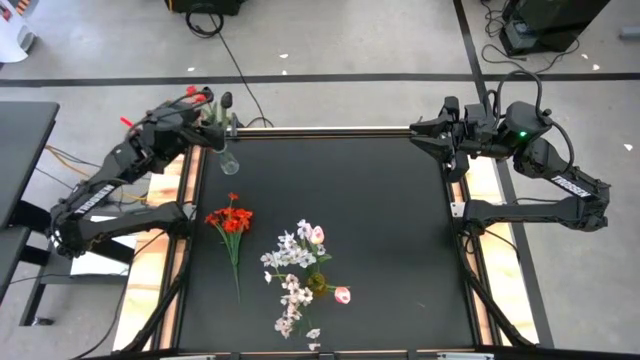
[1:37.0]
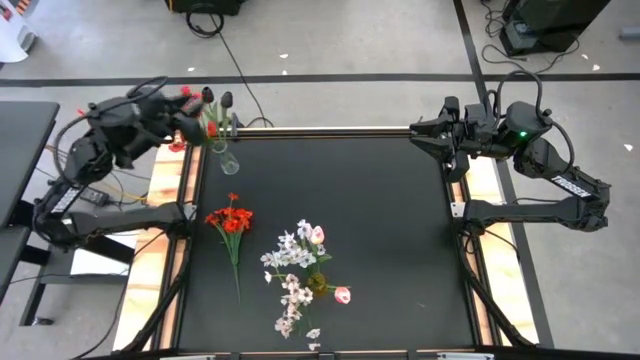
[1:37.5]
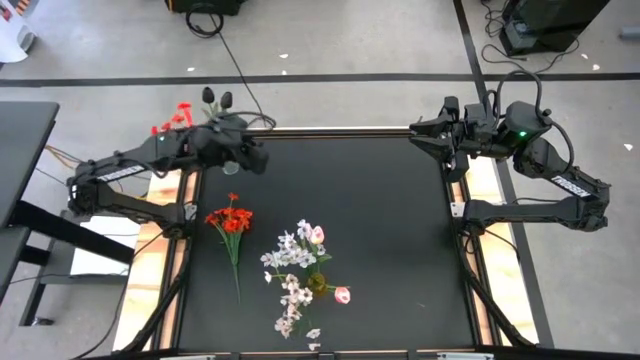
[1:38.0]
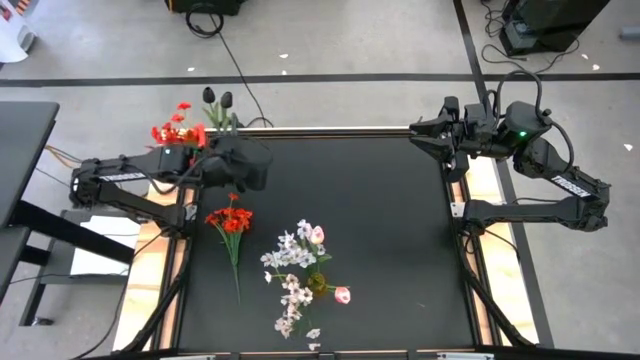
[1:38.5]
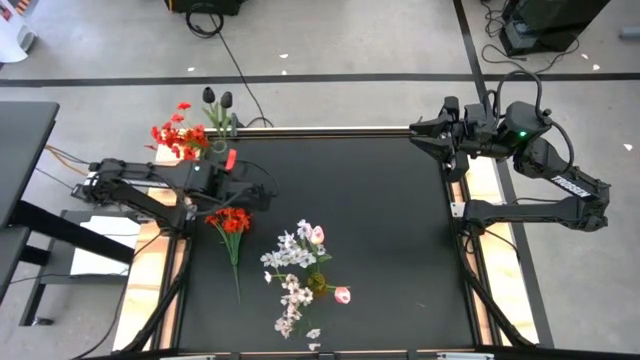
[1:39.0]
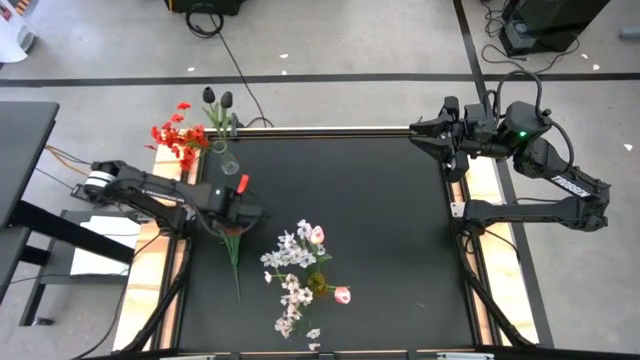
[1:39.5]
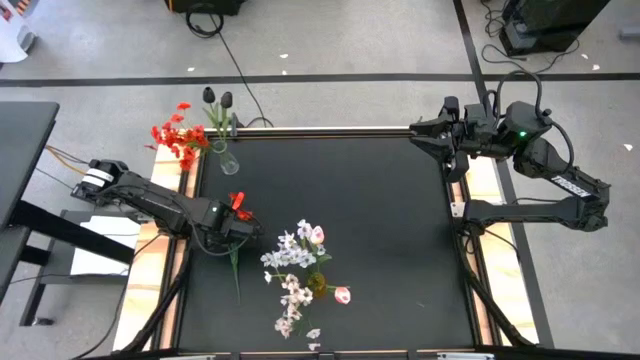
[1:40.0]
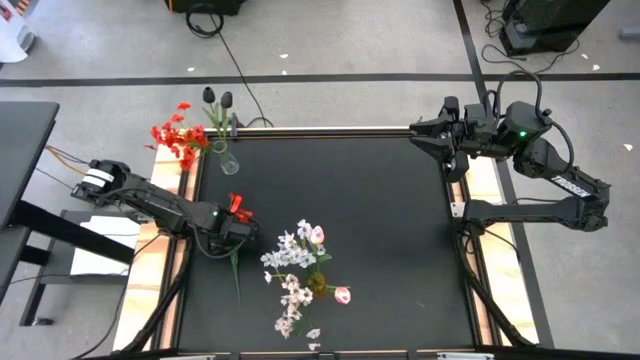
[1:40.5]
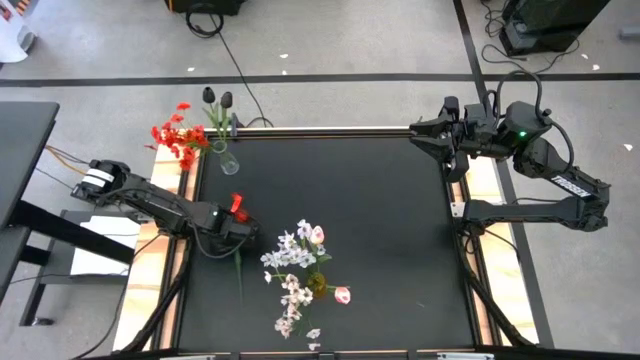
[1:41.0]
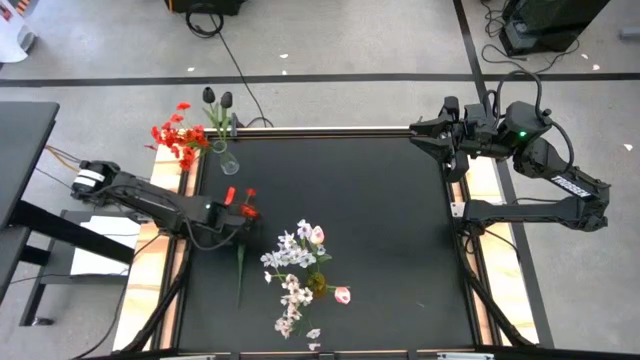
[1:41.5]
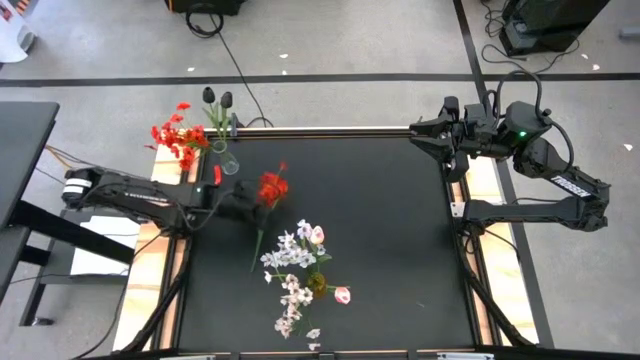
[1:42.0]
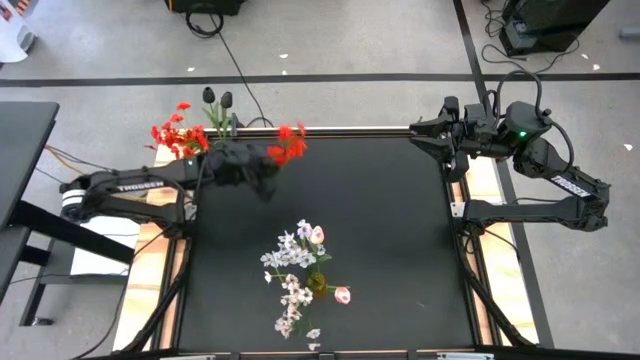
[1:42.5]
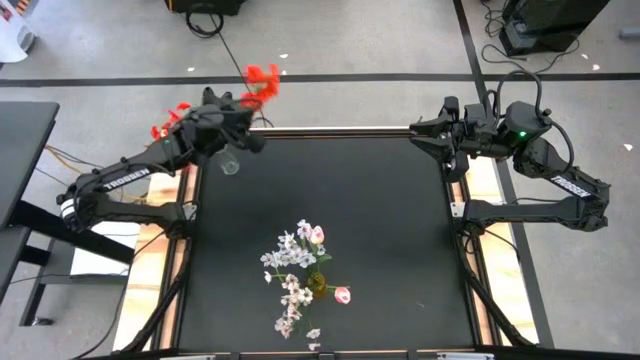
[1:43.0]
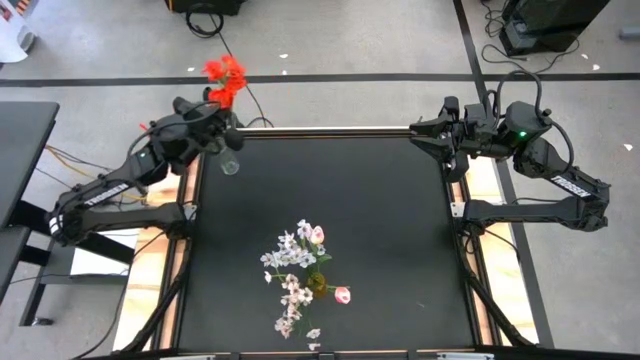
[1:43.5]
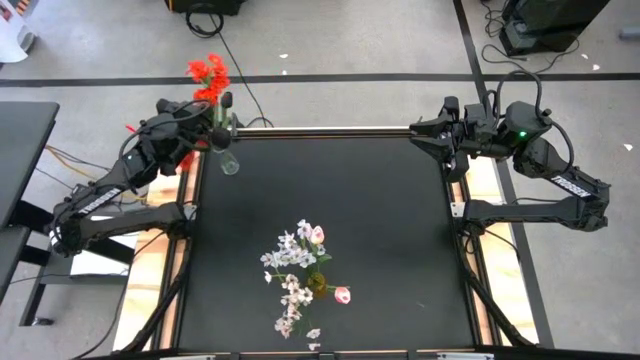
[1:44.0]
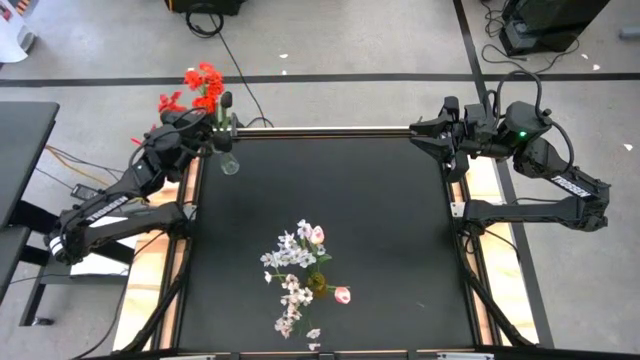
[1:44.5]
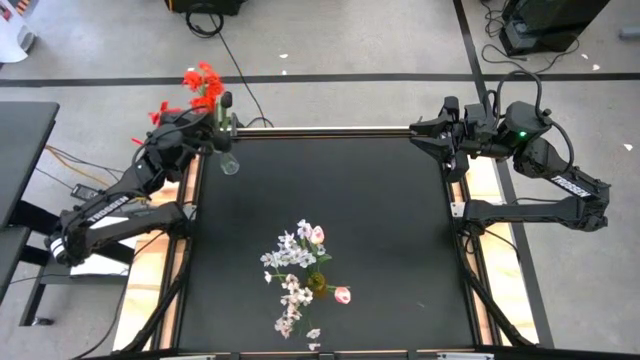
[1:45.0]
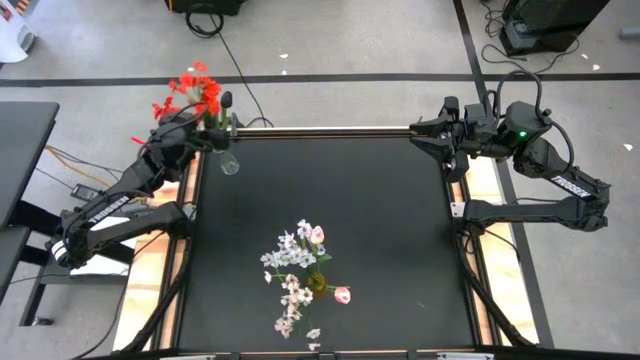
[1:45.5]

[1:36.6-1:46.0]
Task: Sort flowers into vase by color
Put the orange flowers into the transparent vase

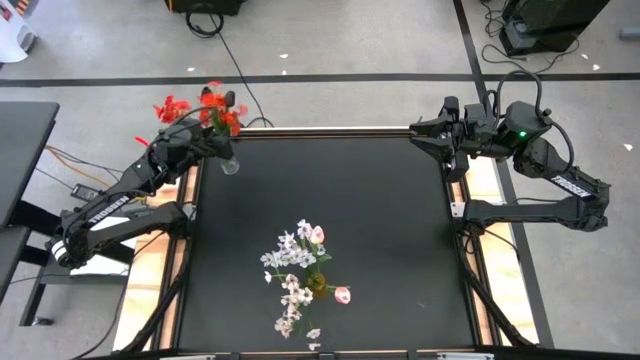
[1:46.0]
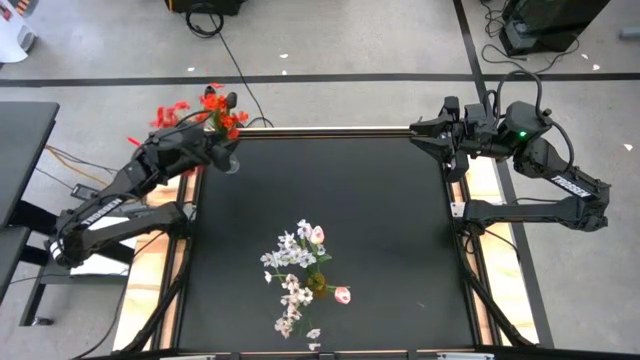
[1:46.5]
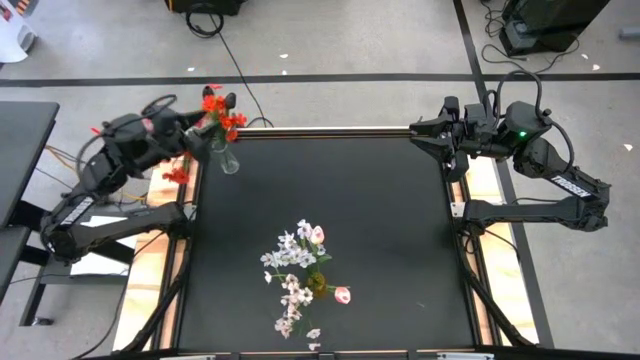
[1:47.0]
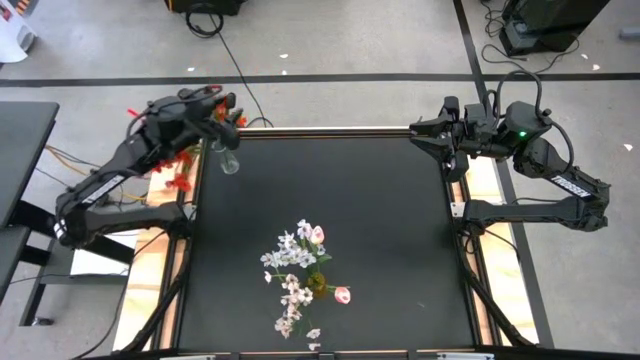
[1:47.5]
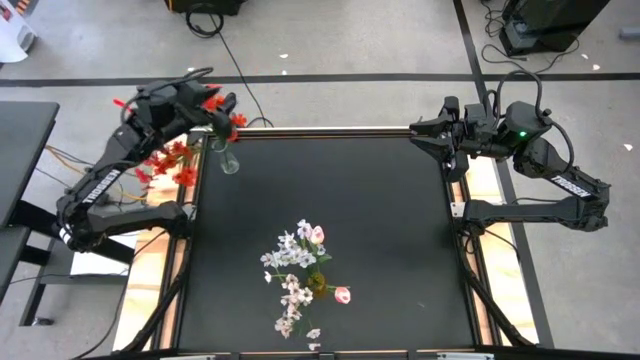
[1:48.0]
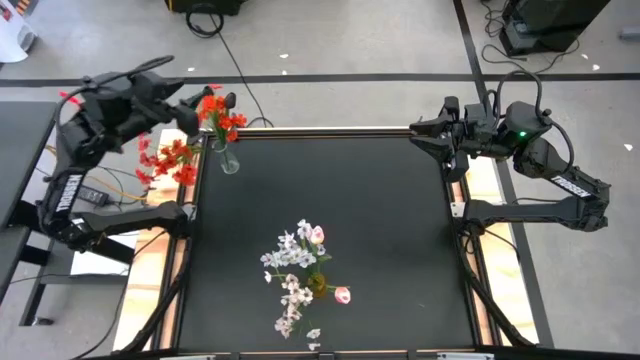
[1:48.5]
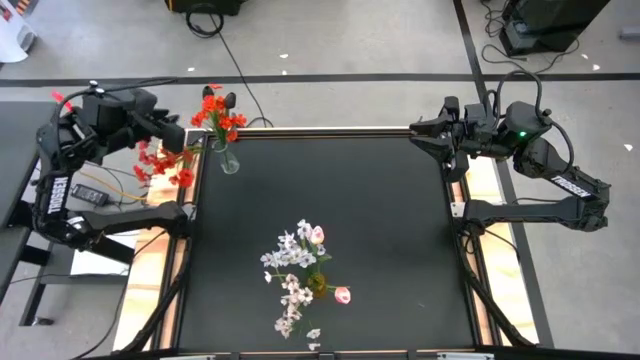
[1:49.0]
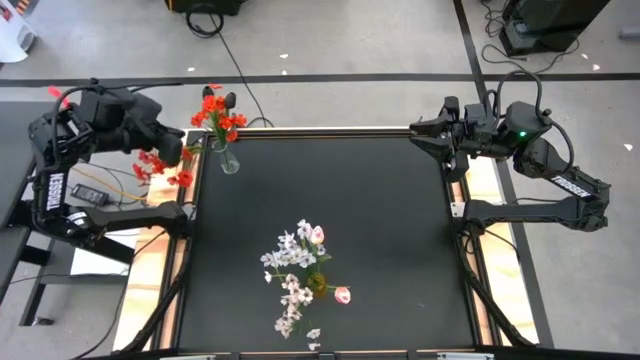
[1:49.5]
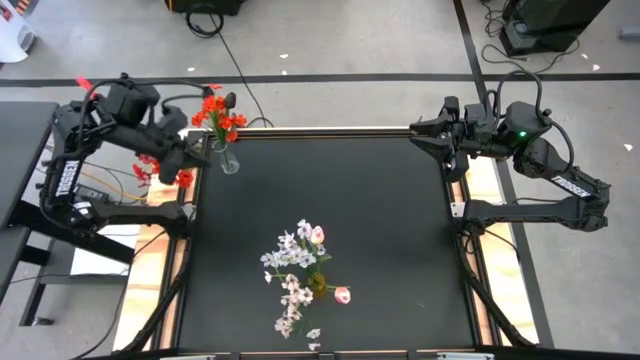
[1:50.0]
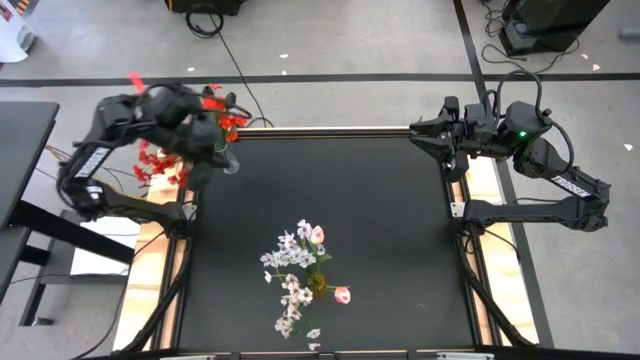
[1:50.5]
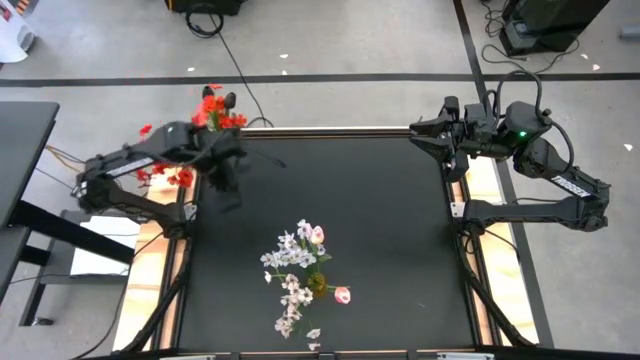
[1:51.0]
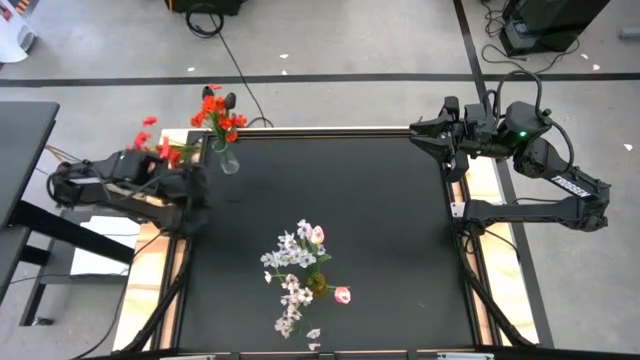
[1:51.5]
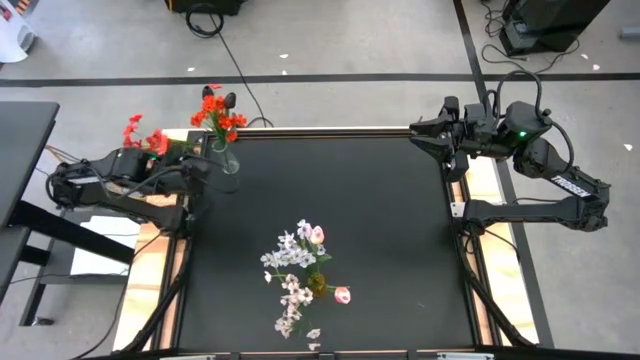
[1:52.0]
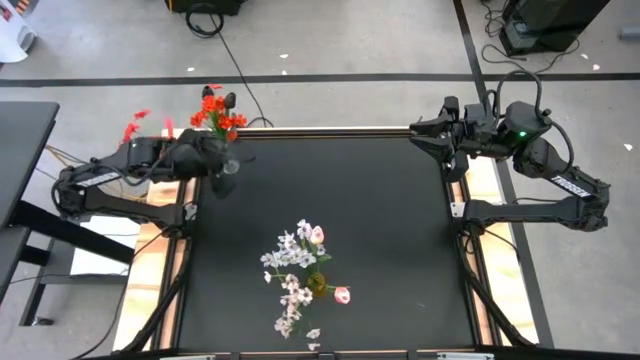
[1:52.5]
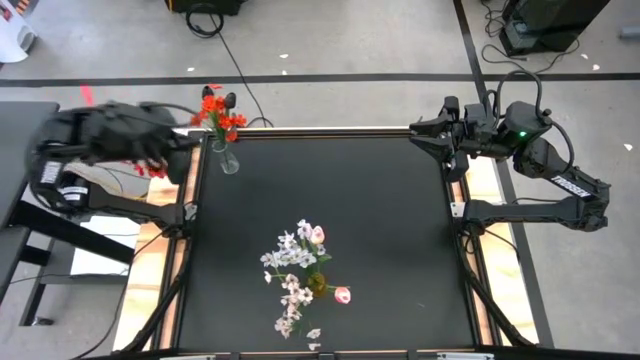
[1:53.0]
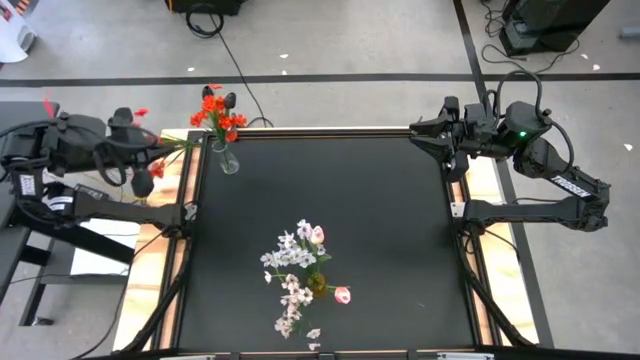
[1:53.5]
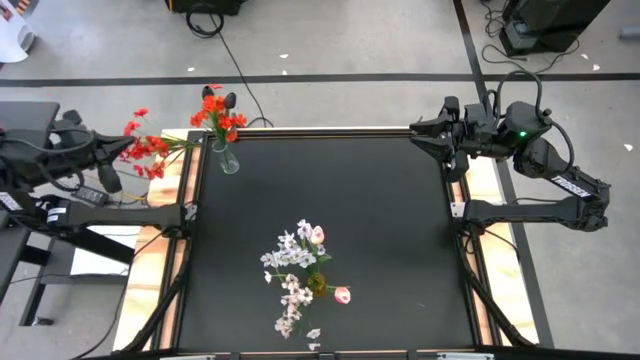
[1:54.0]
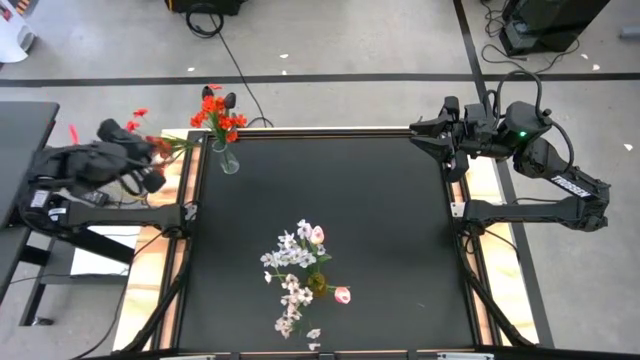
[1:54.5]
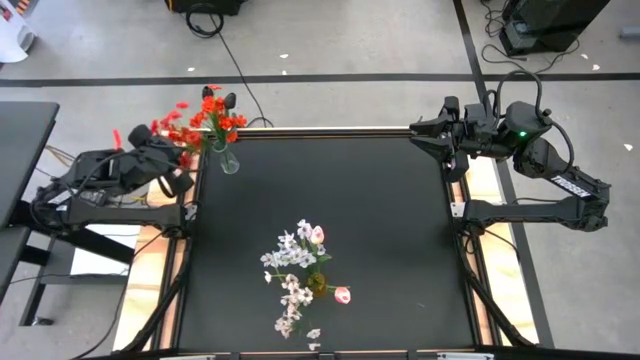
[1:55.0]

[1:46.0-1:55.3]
Adjust the orange flowers
